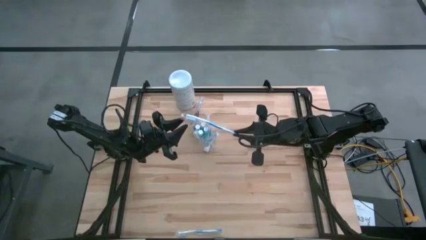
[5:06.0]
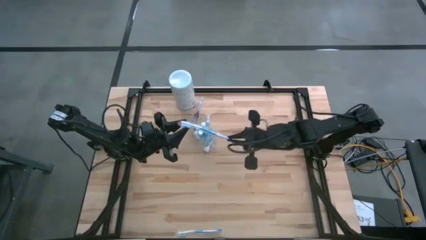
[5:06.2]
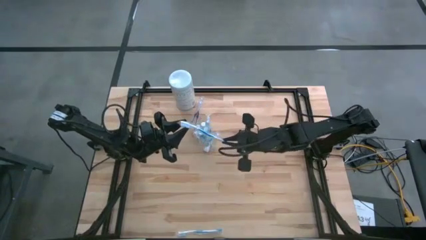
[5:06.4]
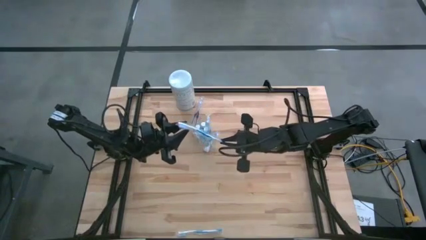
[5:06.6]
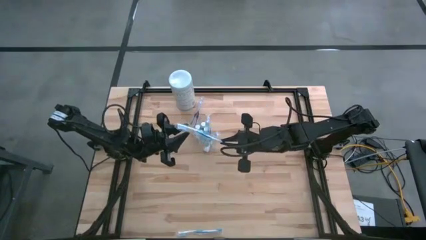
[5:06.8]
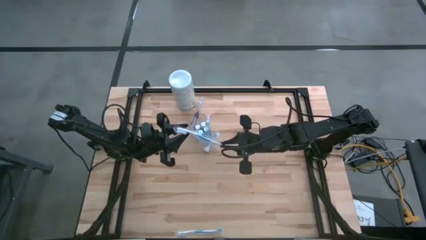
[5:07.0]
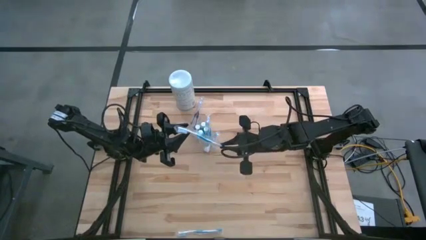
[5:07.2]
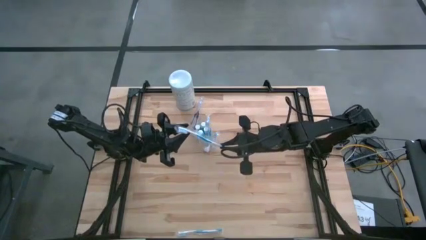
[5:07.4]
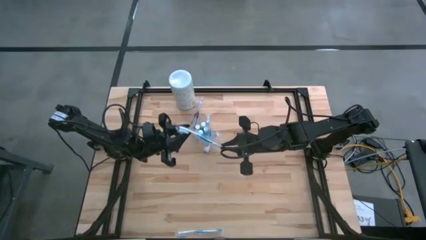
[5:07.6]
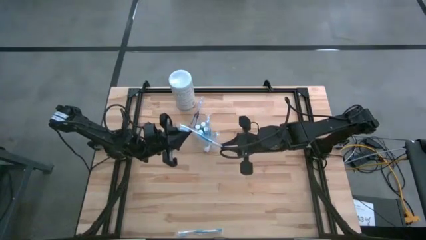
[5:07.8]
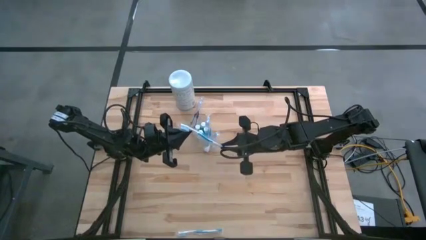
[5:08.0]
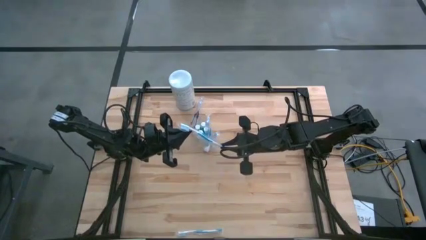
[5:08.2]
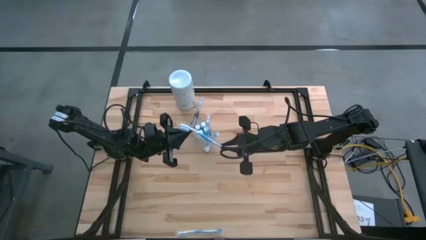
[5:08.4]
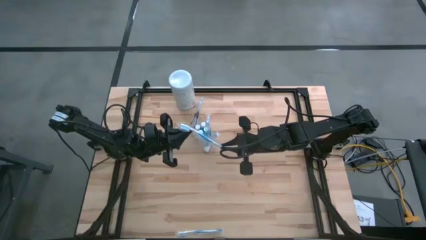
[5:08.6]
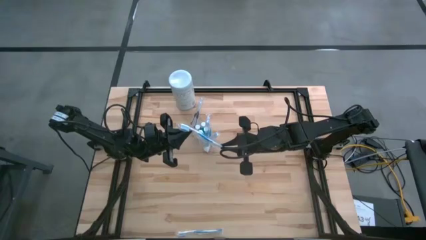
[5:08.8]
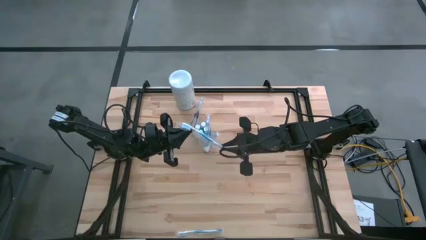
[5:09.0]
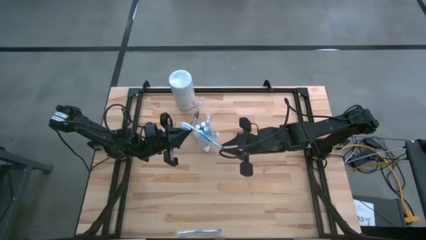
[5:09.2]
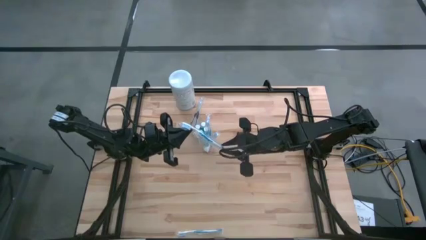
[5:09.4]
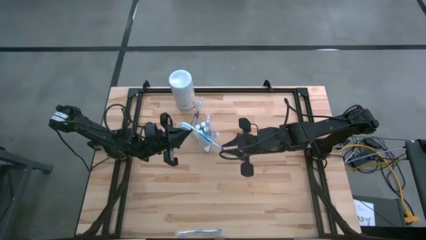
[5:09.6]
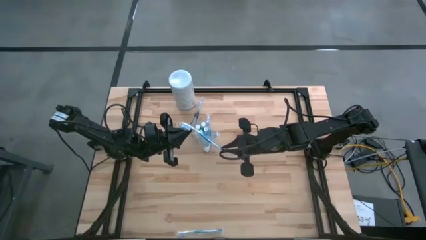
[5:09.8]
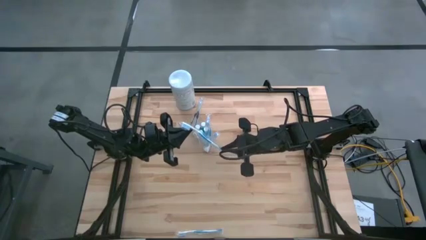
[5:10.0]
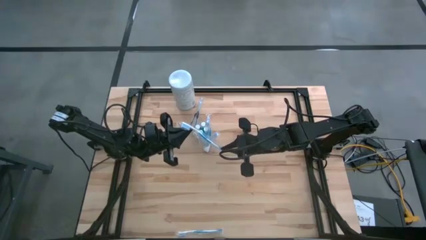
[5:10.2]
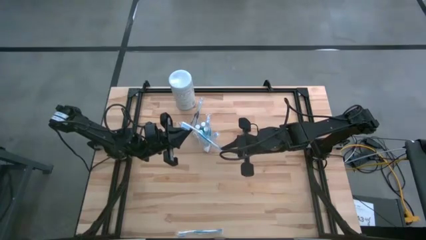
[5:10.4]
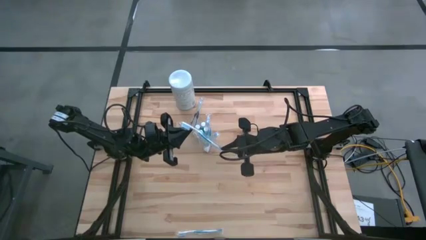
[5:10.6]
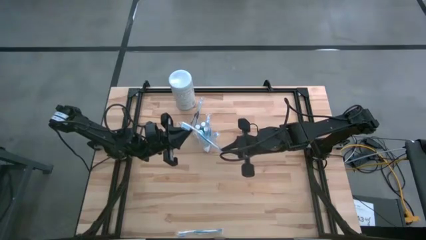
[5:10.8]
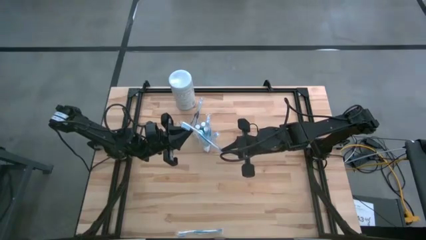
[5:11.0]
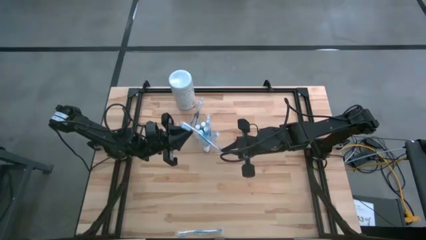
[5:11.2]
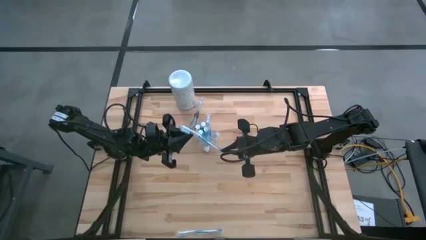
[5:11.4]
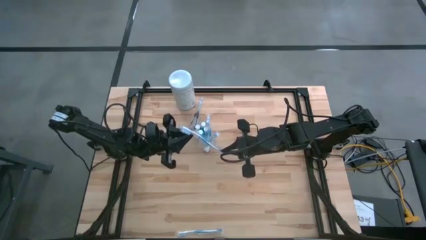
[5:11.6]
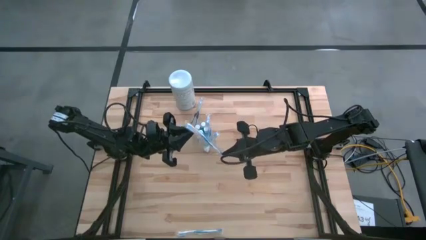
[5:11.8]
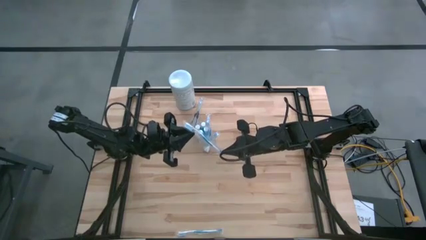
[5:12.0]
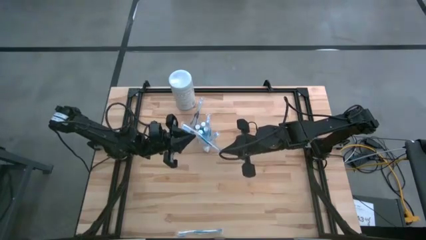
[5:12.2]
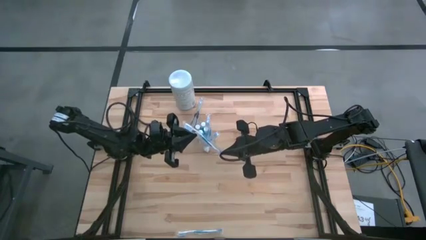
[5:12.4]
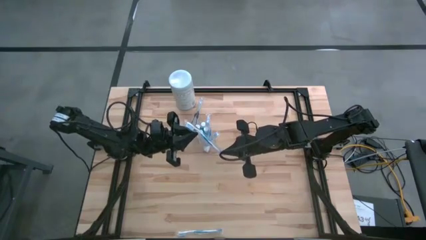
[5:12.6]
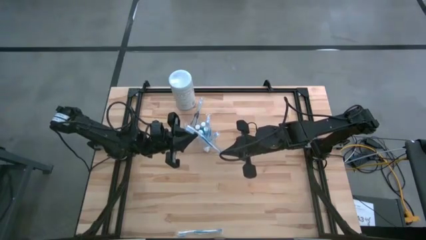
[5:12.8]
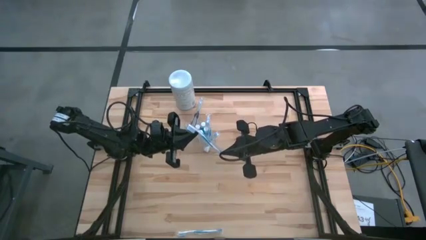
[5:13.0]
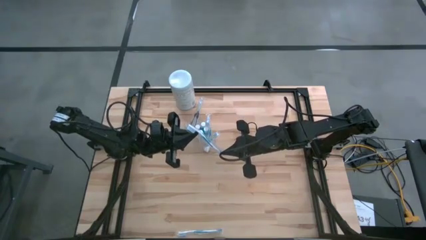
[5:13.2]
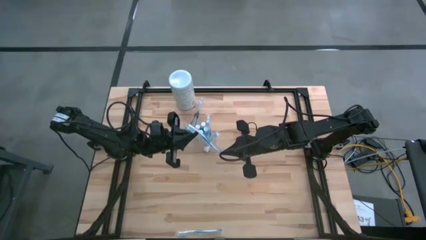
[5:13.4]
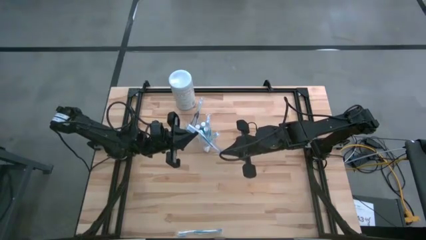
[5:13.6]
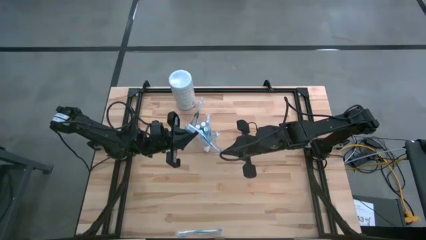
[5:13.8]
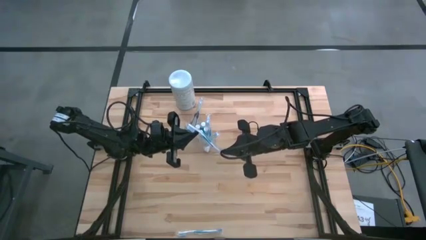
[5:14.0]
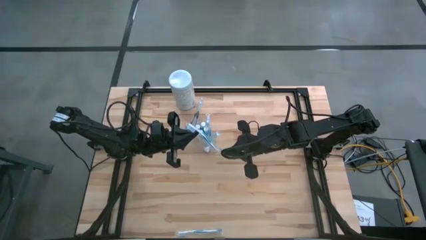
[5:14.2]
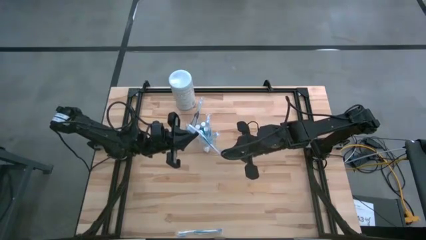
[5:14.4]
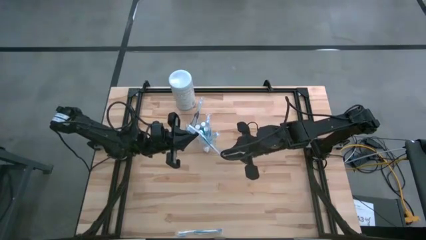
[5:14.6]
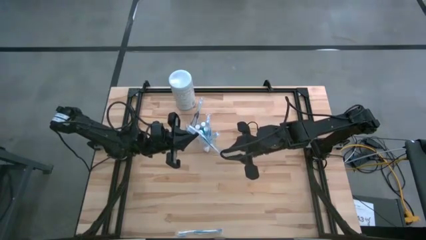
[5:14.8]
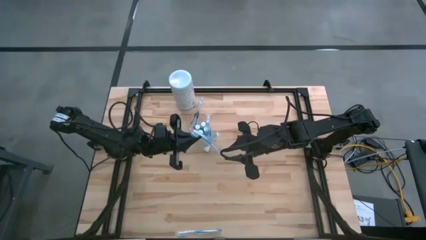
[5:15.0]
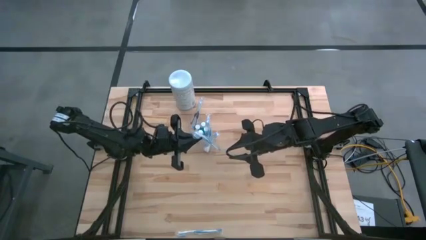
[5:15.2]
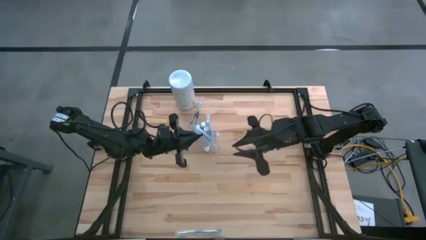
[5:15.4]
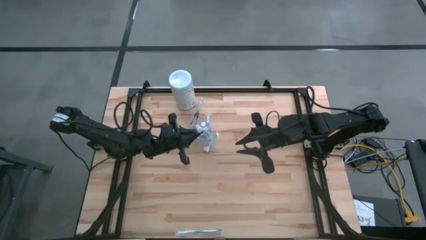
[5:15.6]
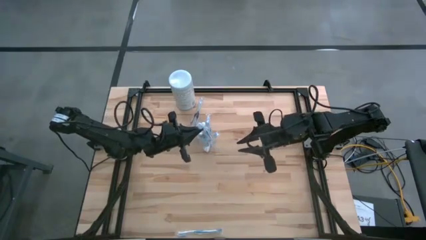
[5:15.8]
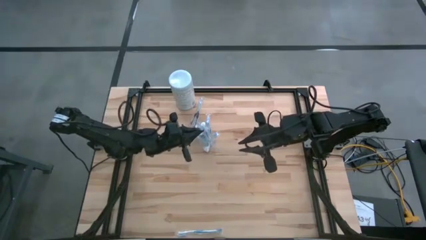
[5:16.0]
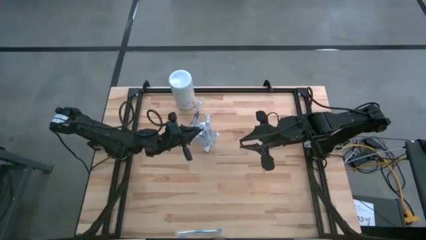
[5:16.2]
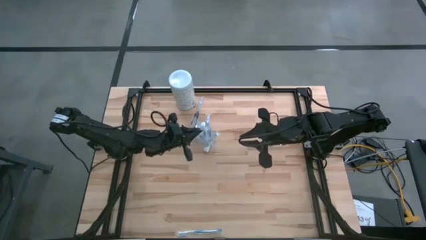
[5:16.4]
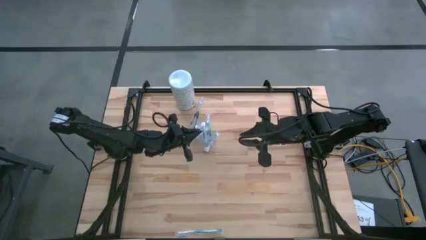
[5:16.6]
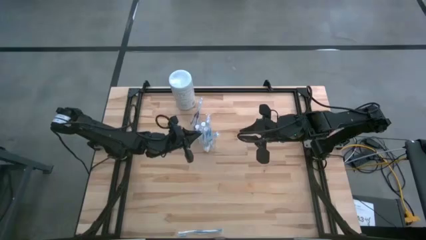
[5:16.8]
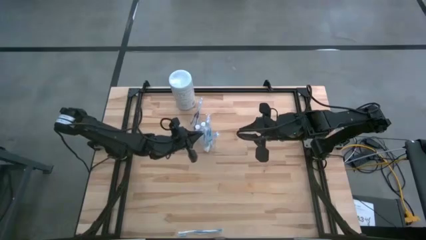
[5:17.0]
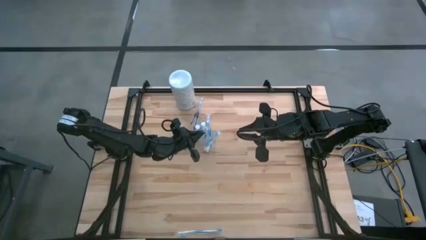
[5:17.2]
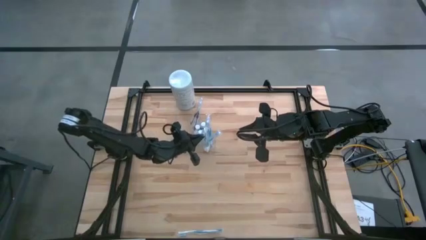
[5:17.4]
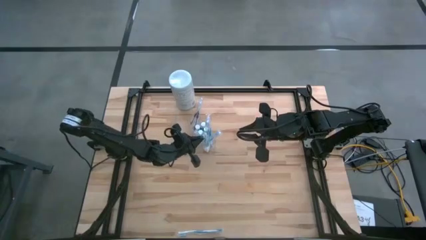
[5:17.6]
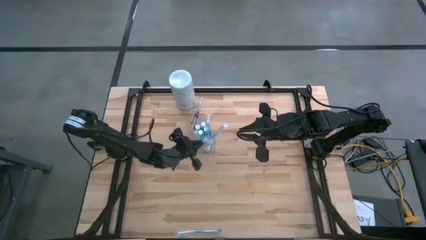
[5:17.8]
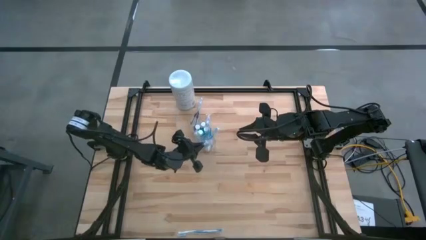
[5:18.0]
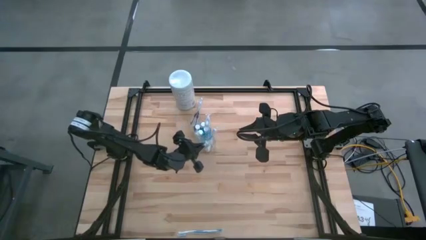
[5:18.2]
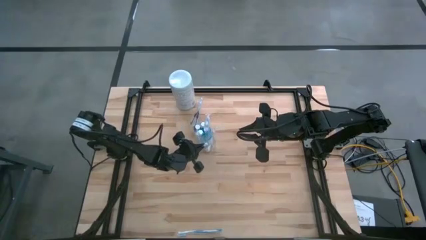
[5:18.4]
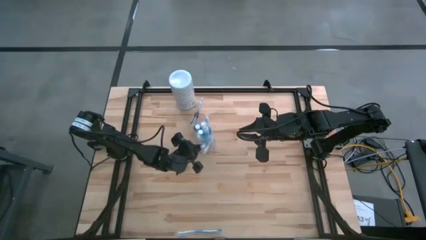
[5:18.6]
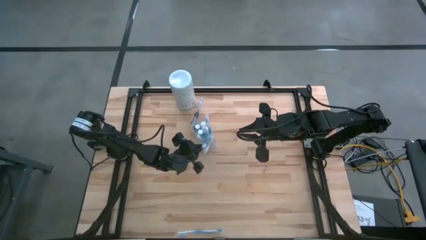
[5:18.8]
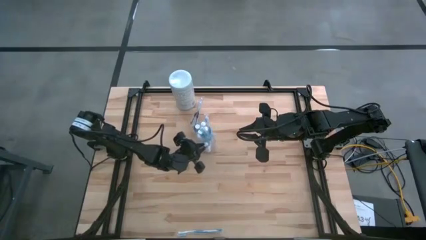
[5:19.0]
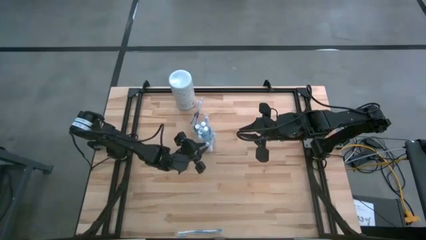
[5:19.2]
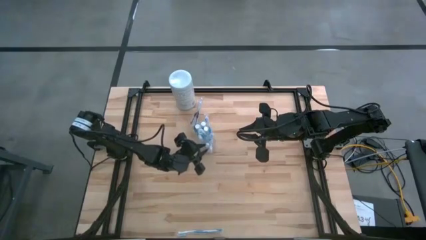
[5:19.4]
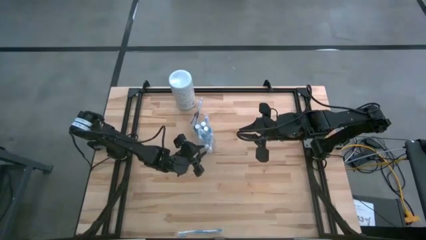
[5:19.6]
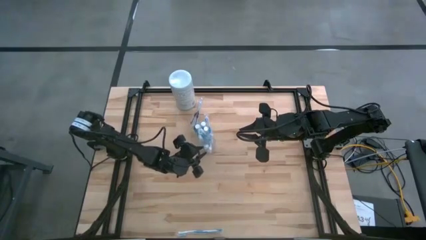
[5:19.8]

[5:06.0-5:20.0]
Task: Pick & Place toothbrushing station
Put the blue toothbrush into the right of the transparent organizer

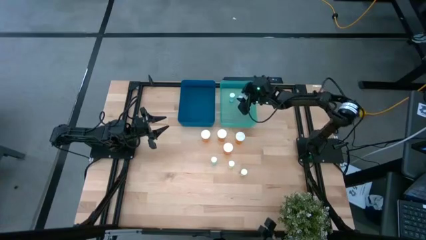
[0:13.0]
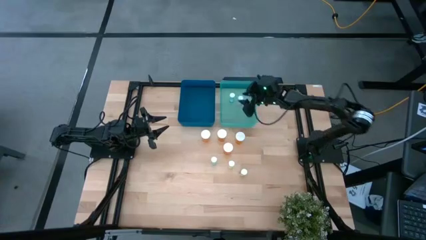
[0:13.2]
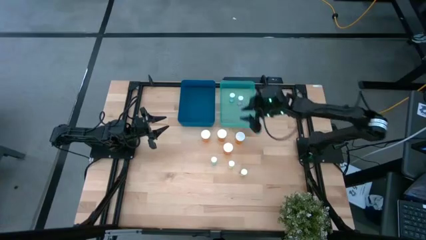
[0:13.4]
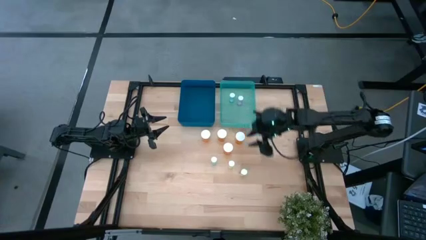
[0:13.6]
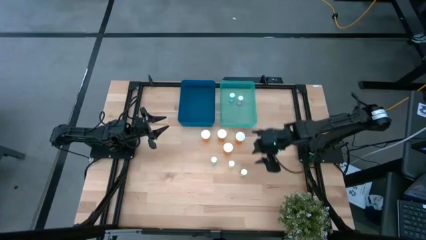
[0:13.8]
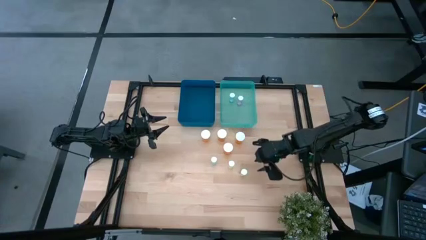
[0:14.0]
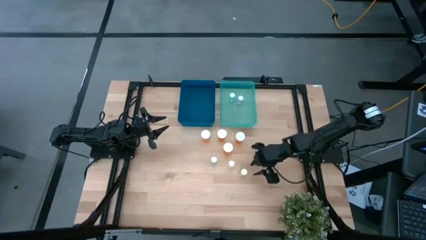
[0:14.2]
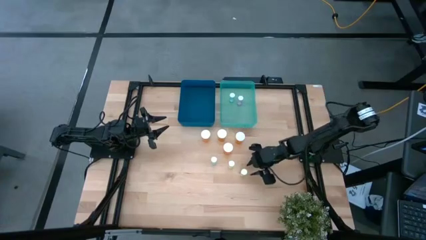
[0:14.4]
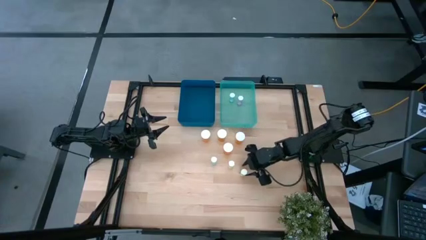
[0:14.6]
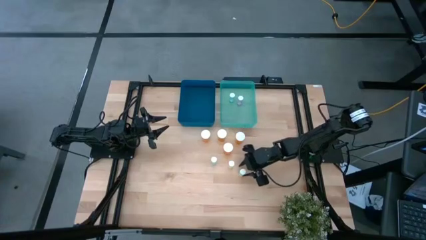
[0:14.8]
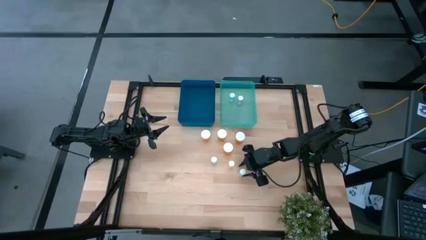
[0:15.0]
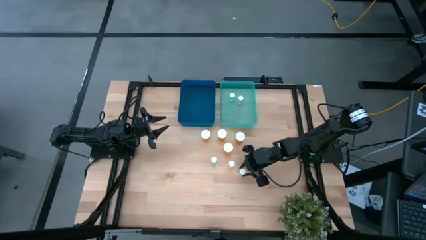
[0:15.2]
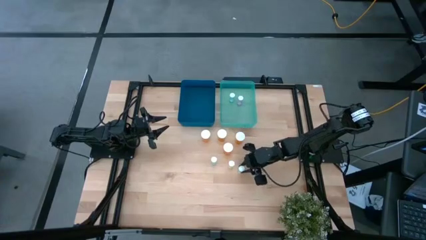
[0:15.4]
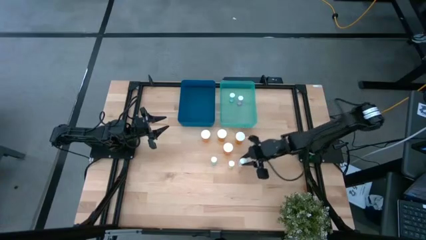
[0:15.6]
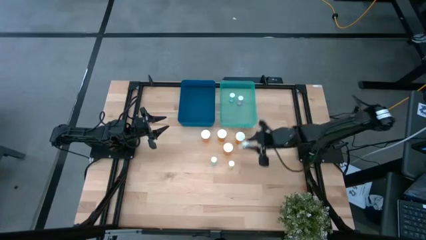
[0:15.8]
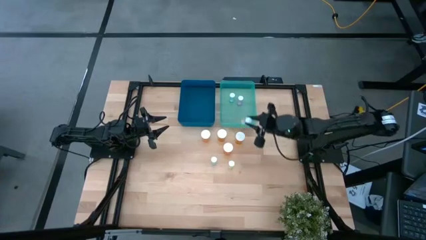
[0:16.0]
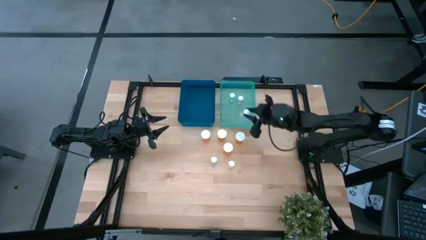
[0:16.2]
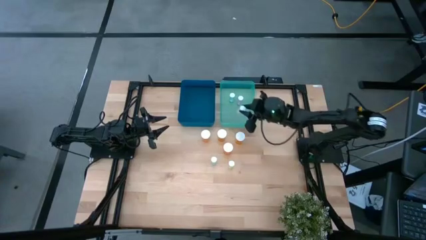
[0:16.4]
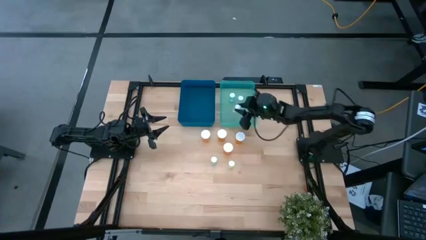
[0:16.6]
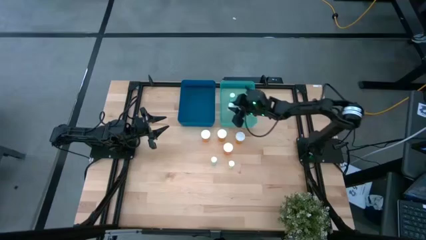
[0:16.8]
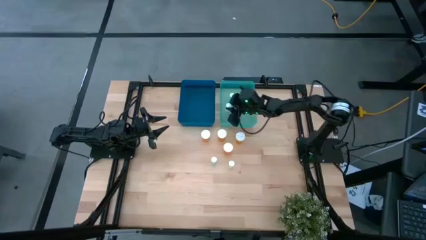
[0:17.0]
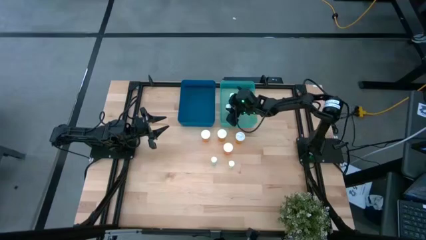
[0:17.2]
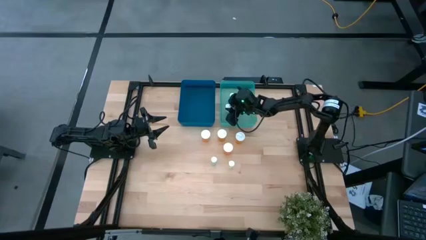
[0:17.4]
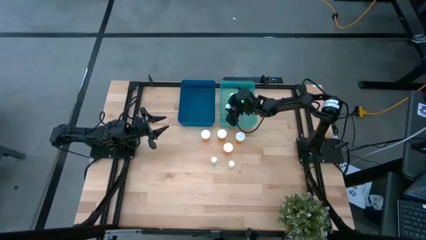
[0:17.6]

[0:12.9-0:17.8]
Task: Pick and place medicine bottles into bin by pill shape (circle, oval)
Put the yellow tablet bottle into the light blue bin
